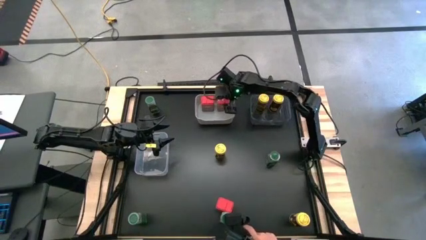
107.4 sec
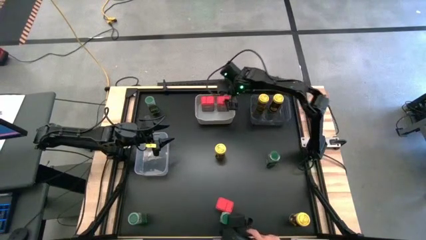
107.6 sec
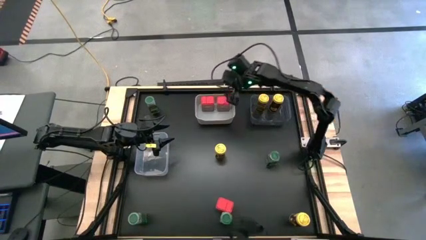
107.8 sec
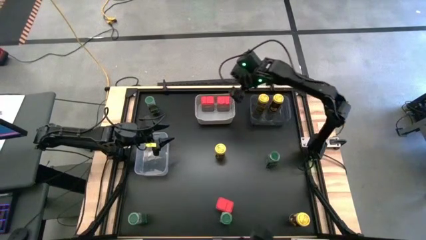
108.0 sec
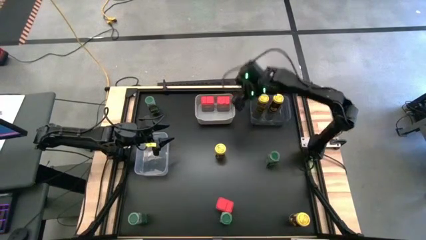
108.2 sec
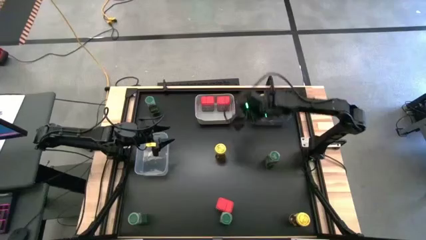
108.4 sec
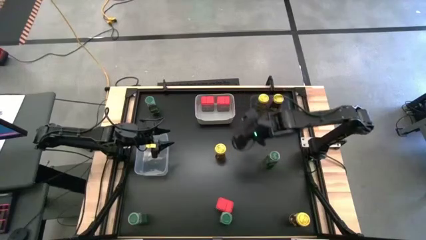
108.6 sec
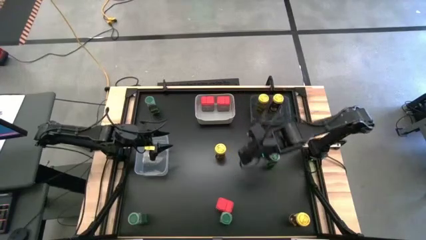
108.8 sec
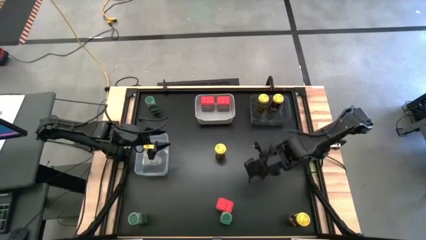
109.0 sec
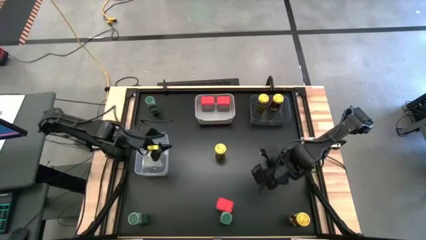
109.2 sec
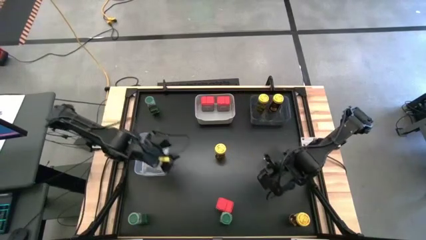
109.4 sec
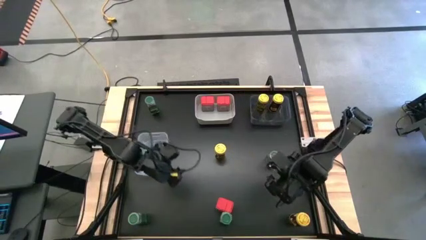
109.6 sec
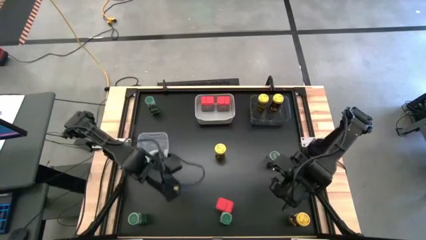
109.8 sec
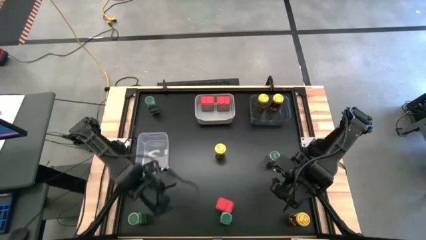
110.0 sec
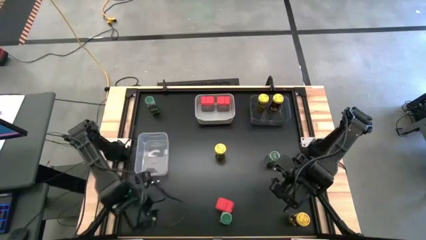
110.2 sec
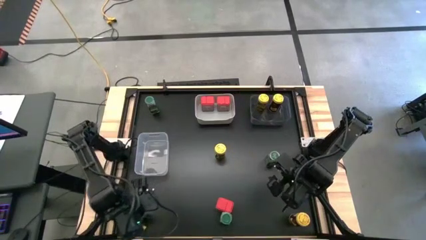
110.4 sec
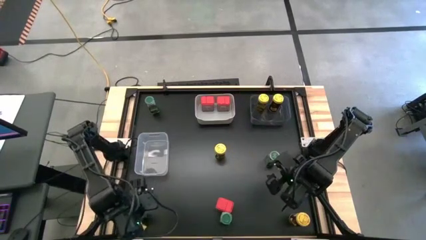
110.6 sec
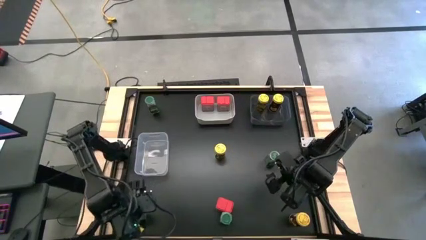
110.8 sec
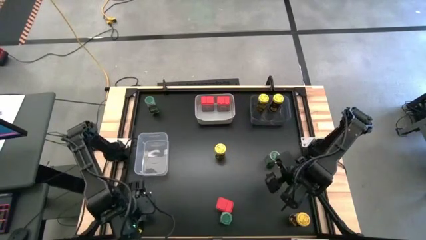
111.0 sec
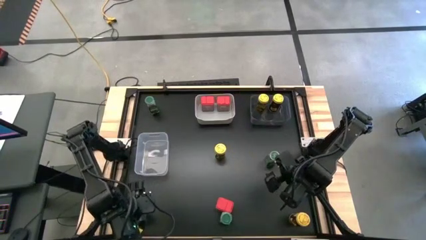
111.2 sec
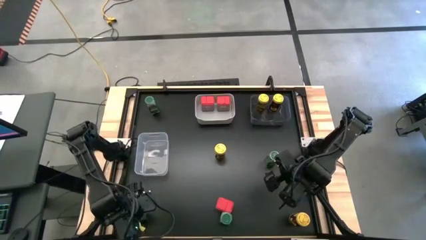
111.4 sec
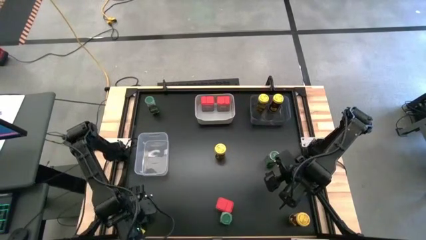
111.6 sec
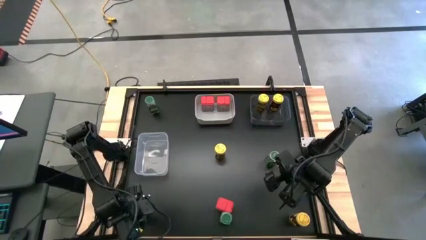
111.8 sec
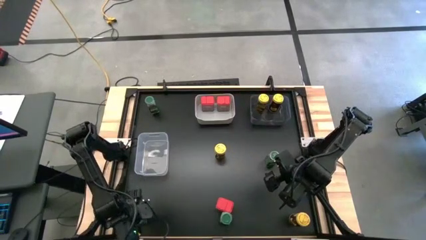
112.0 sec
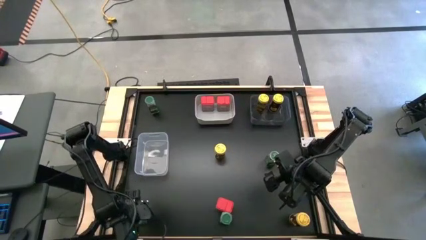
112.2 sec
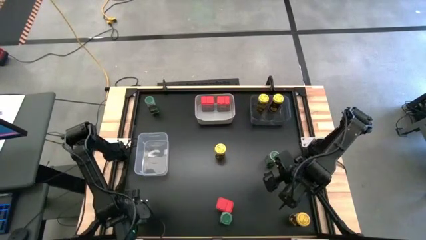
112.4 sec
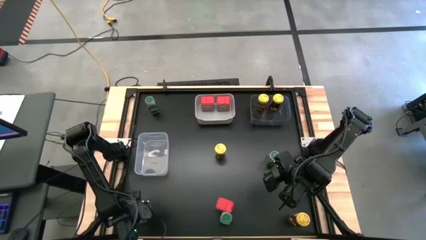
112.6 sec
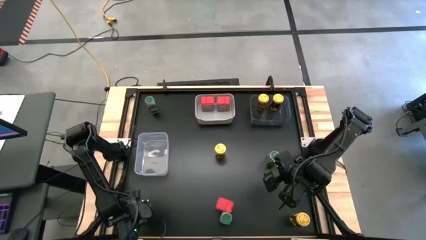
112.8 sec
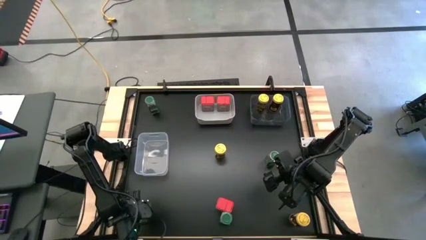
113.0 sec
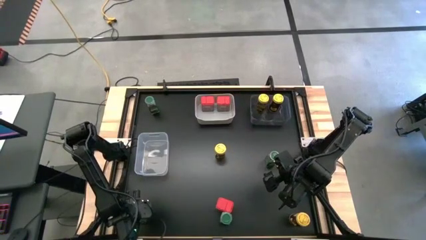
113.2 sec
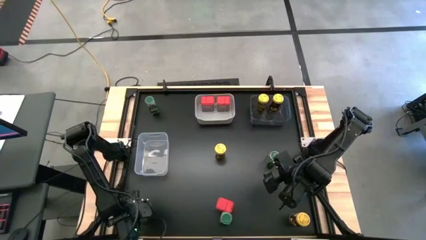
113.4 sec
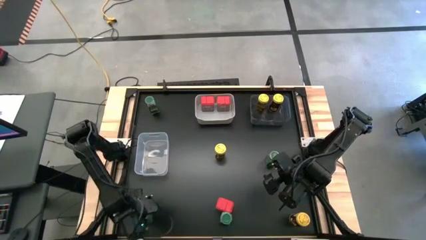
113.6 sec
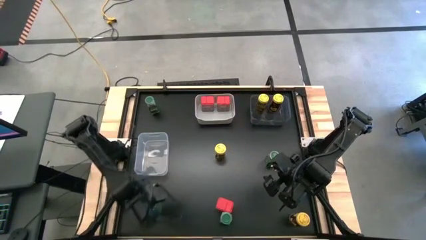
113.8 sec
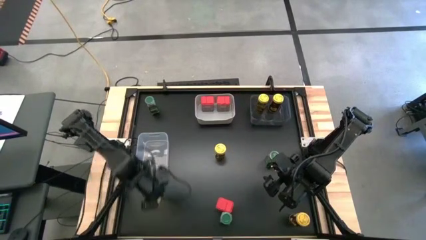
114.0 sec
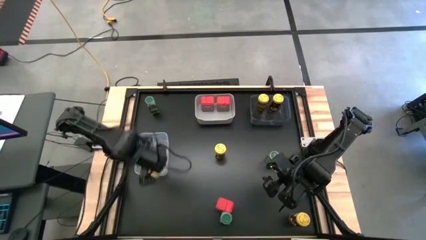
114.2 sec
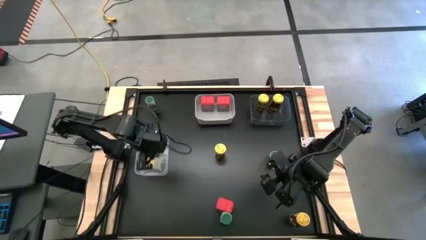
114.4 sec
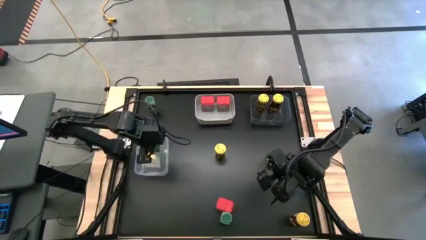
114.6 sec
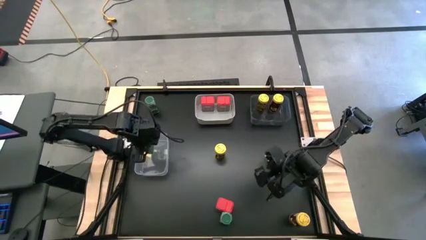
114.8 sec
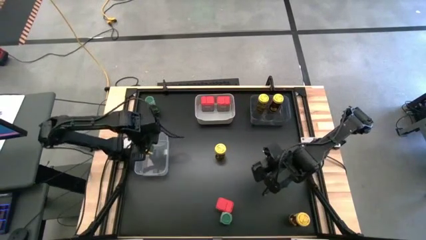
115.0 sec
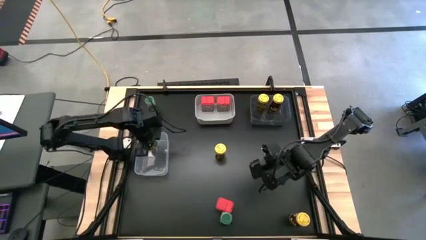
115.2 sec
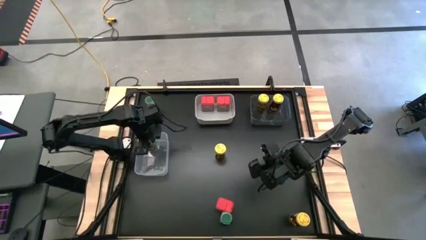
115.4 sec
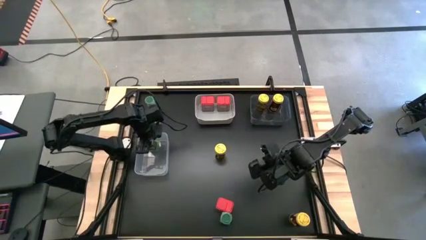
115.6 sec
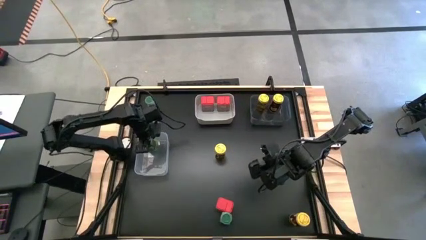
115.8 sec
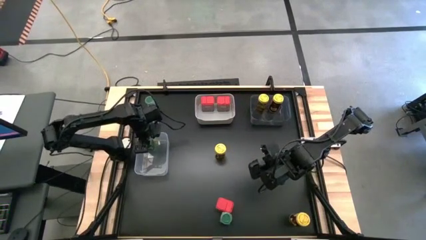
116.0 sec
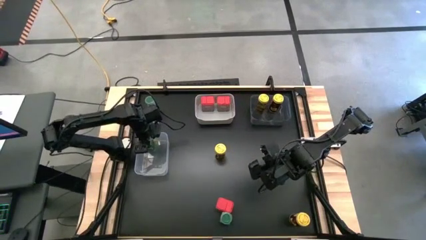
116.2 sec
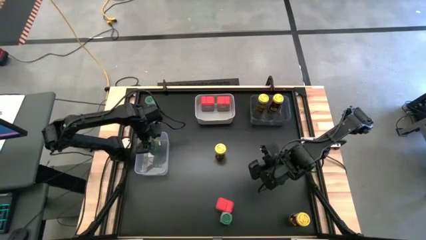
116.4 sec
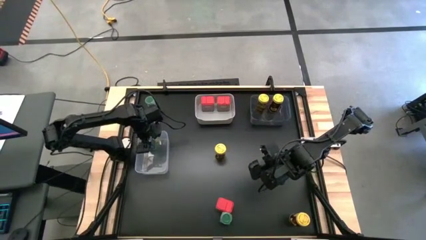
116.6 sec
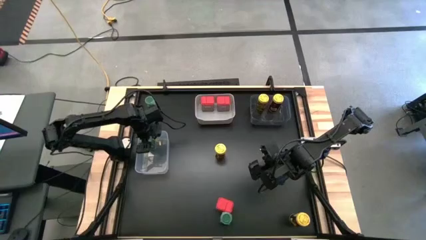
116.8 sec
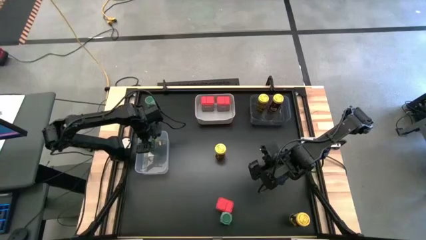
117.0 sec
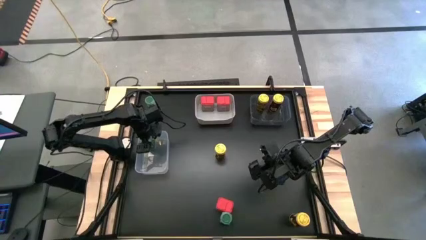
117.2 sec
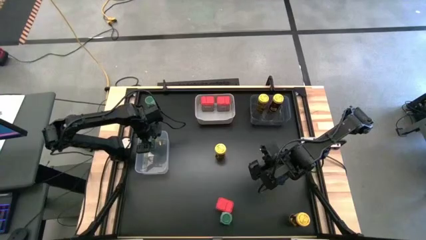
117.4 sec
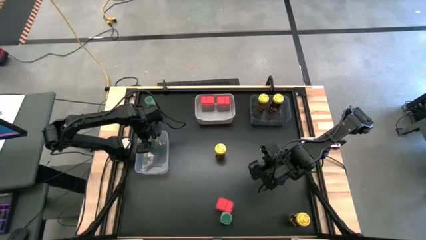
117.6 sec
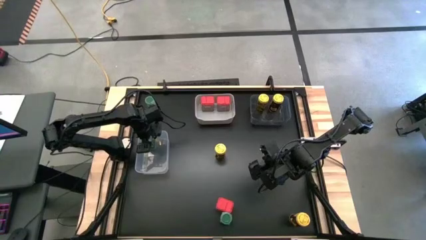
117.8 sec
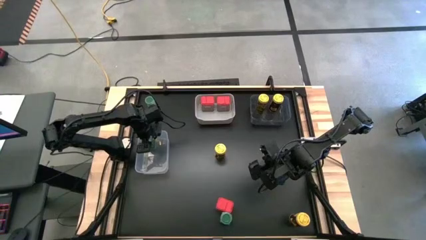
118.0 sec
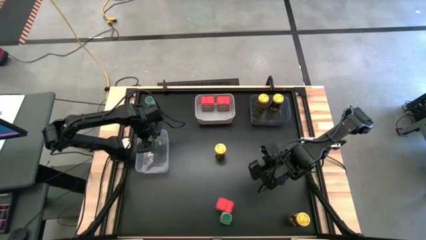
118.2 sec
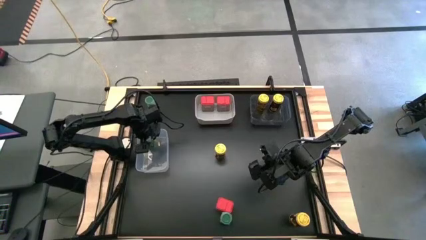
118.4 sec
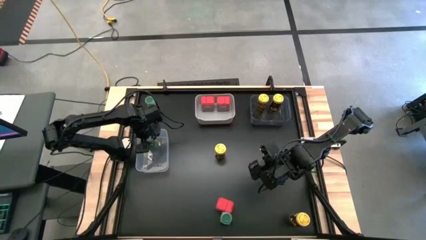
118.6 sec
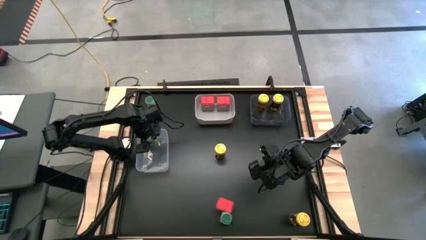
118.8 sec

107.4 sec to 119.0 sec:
Task: Sort spices by type
Put the bottom left green seasoning bottle into the transparent bin

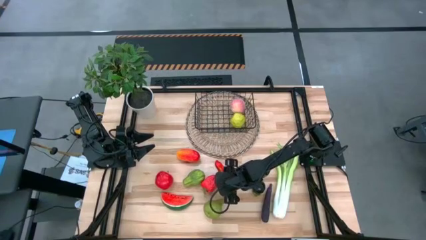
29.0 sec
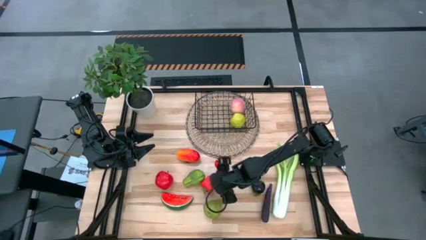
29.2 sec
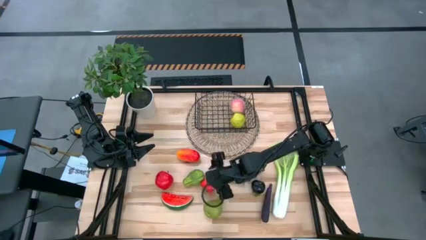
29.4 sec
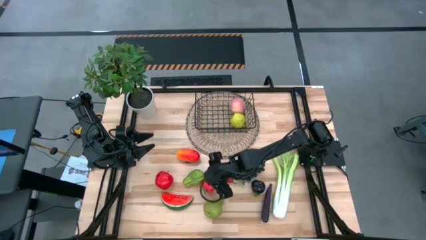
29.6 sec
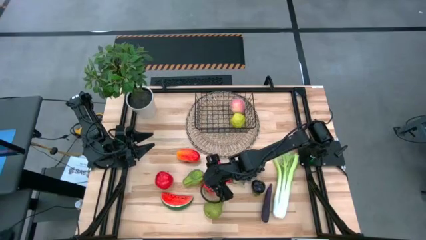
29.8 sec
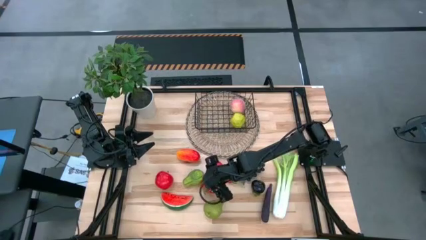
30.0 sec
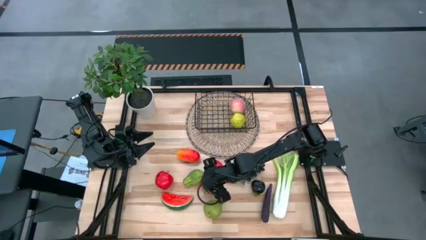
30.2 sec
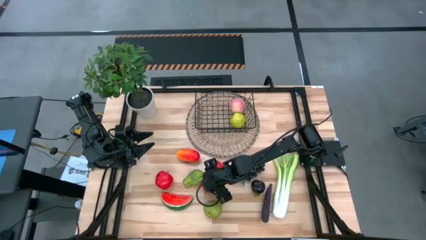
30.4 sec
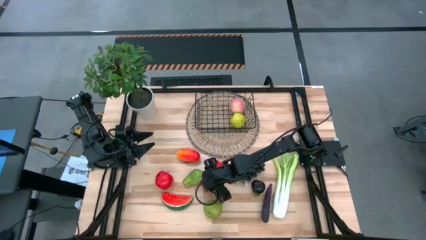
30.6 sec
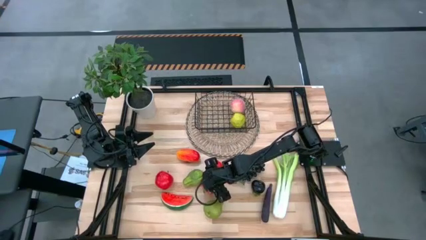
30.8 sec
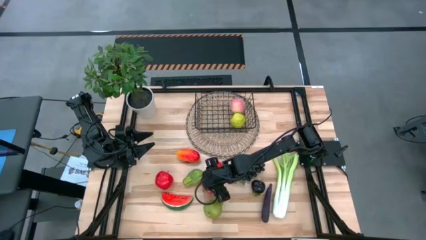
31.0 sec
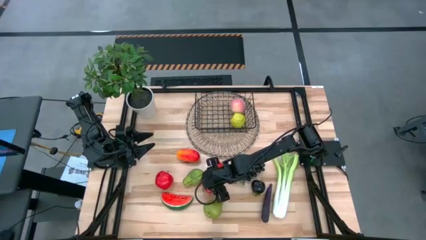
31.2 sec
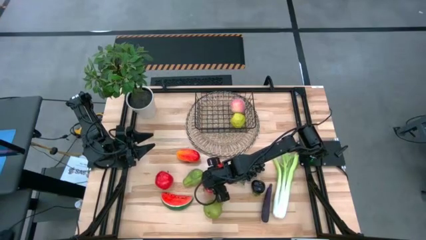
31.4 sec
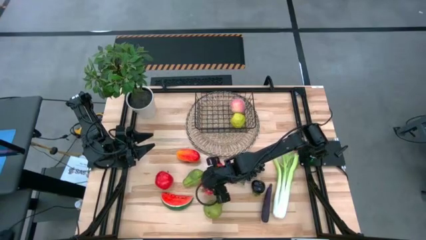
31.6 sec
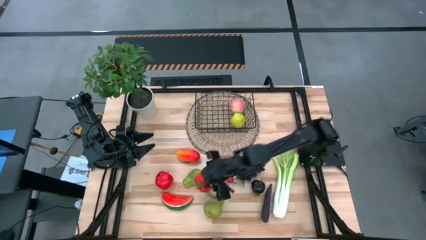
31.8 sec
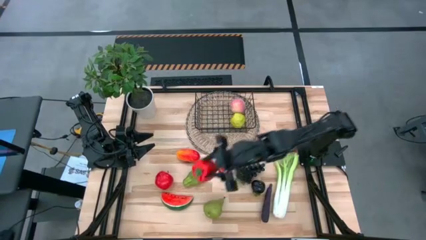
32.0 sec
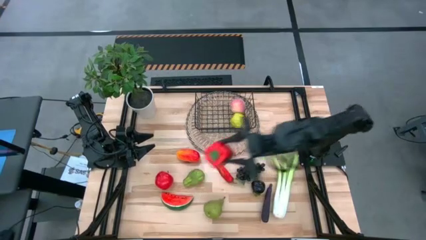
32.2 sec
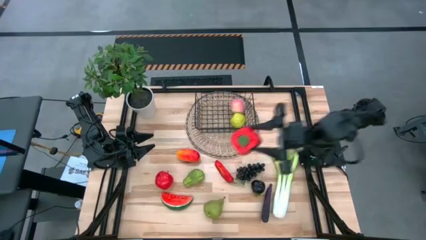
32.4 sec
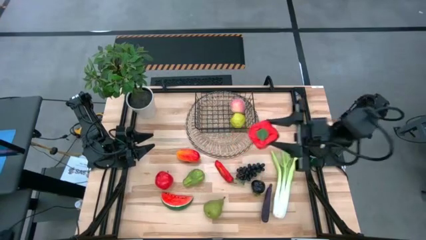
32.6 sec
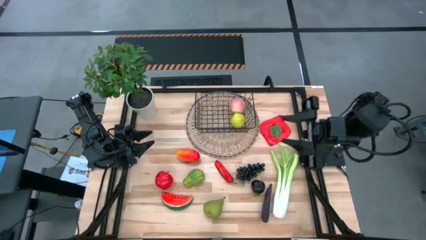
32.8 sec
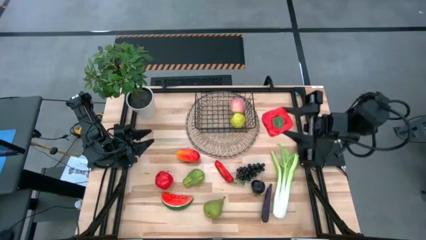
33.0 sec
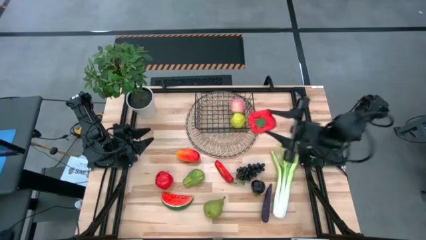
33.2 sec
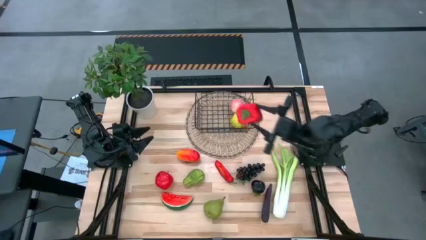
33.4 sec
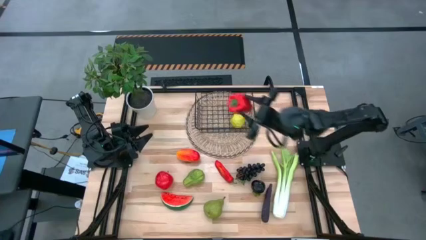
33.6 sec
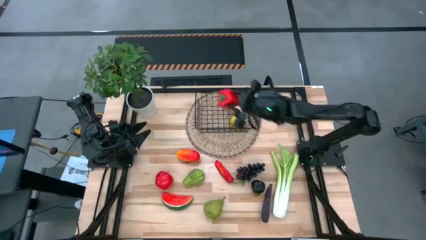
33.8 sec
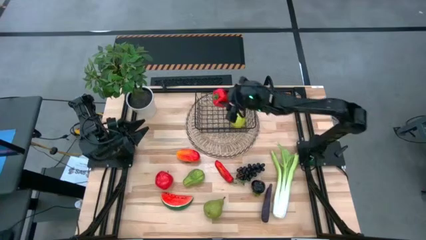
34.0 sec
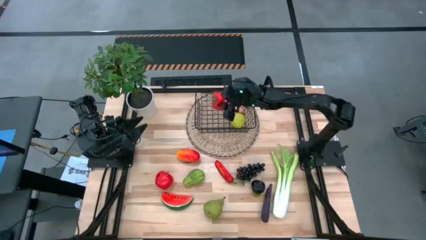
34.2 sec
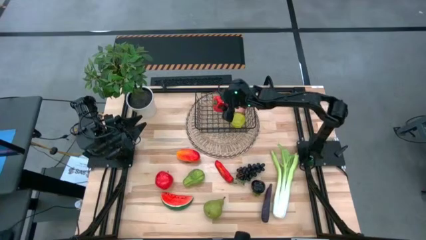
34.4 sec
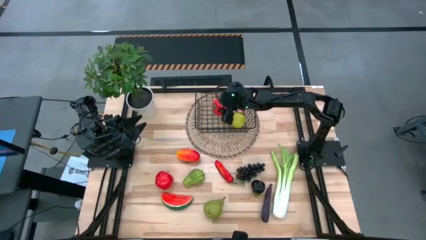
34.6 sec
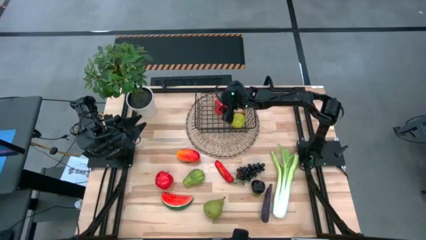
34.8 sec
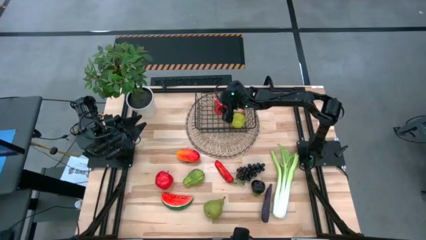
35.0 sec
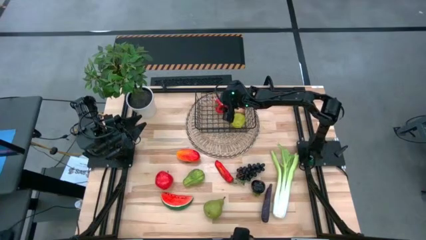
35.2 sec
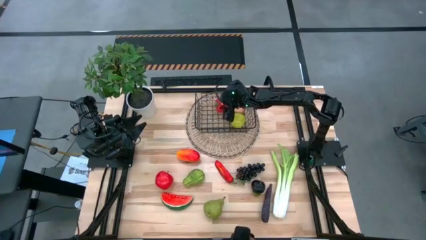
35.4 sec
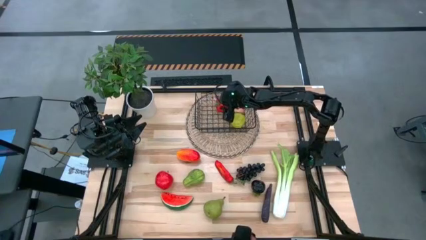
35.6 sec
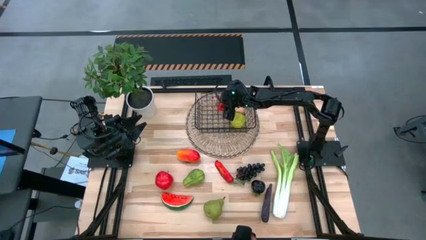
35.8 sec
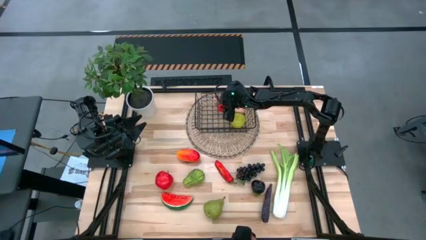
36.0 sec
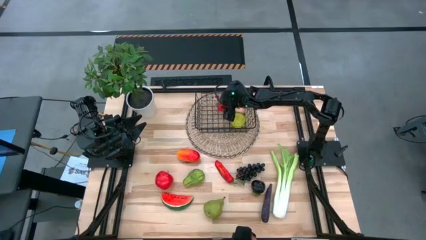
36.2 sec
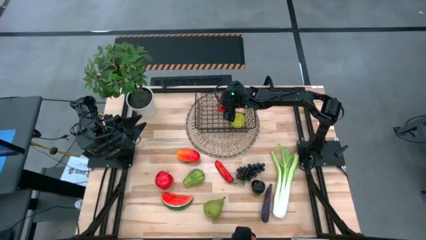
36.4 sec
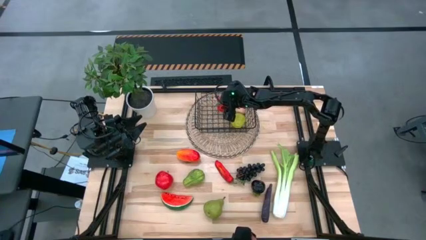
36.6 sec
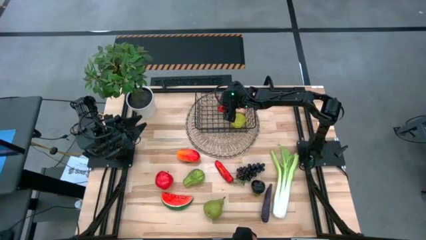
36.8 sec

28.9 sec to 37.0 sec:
Task: Build produce basket
Put the red bell pepper into the black wire basket
